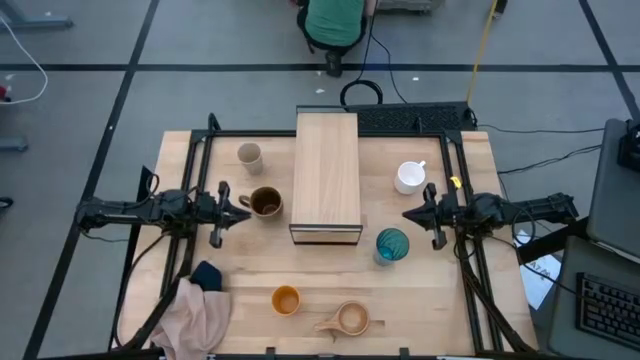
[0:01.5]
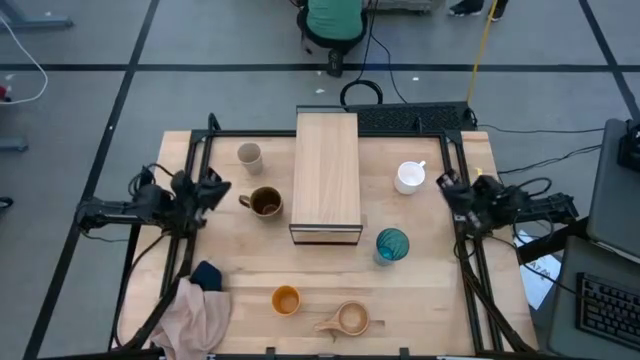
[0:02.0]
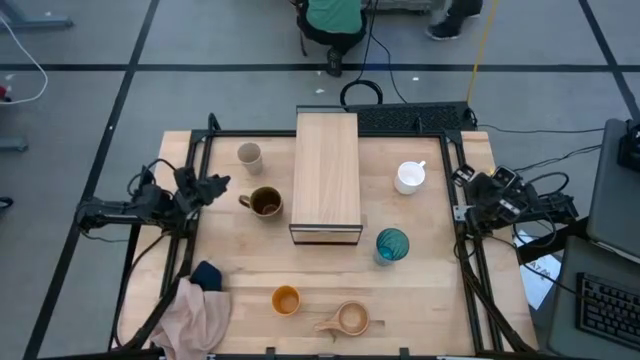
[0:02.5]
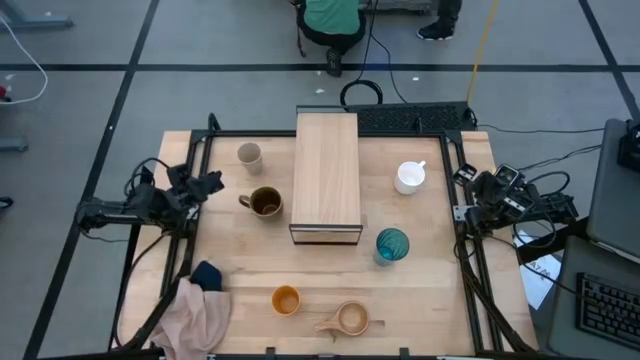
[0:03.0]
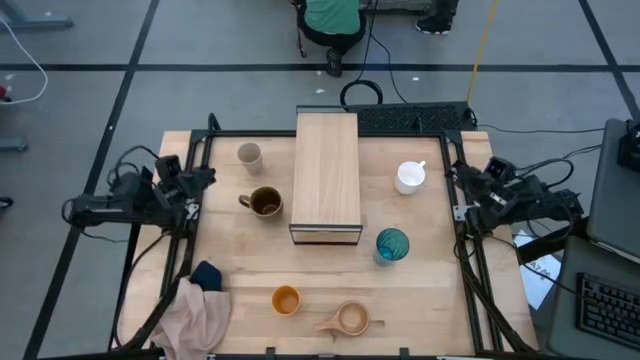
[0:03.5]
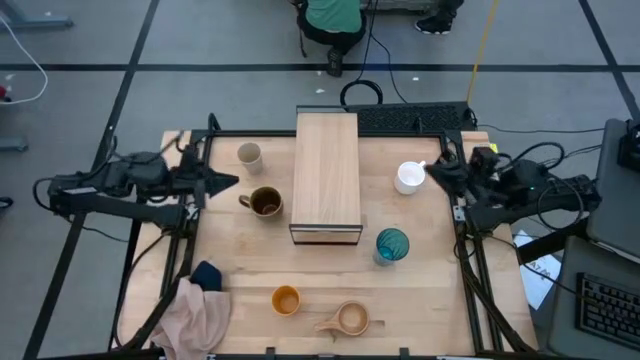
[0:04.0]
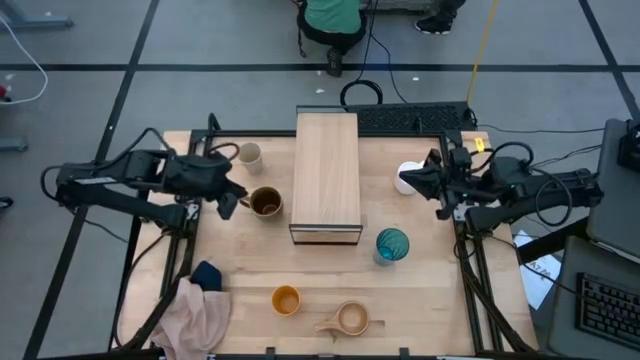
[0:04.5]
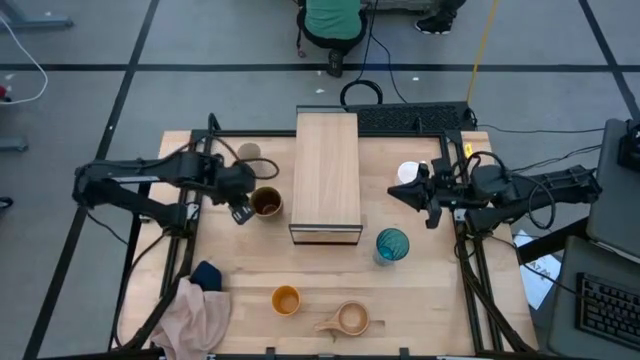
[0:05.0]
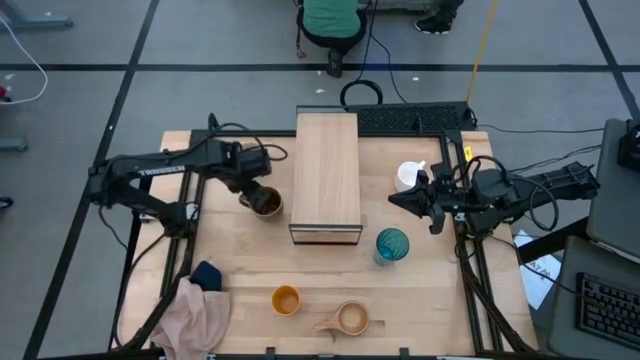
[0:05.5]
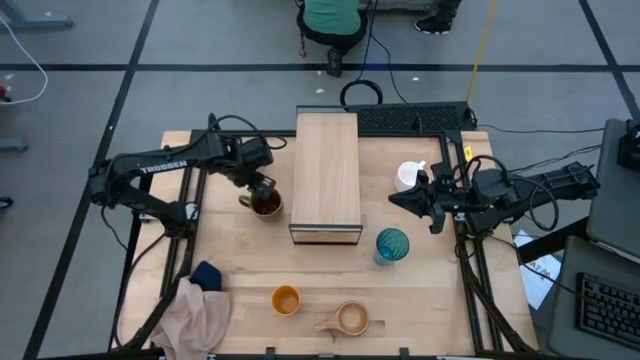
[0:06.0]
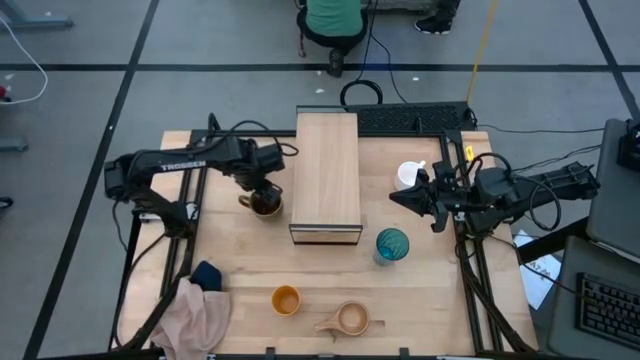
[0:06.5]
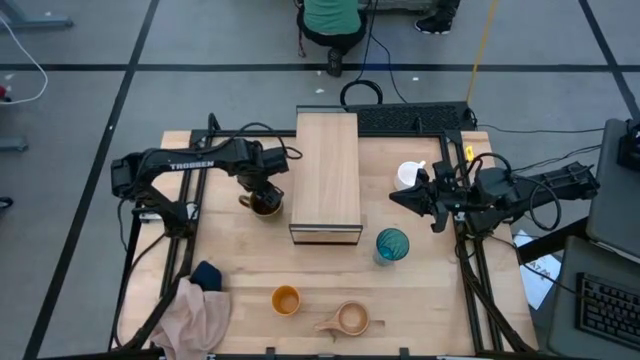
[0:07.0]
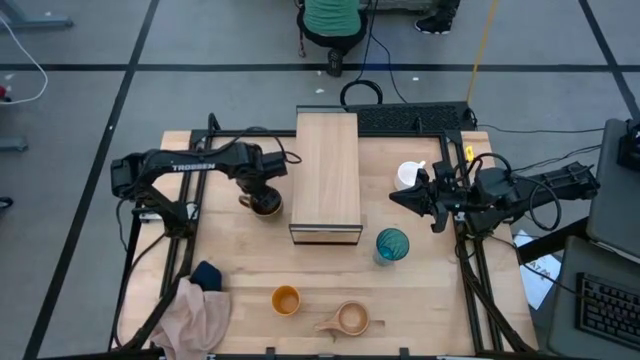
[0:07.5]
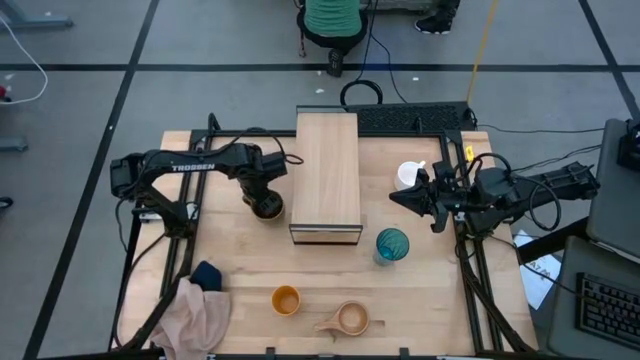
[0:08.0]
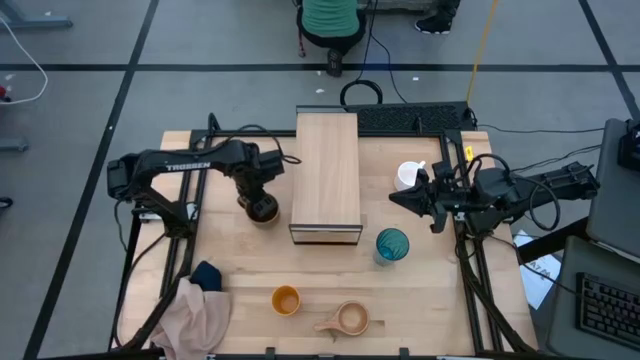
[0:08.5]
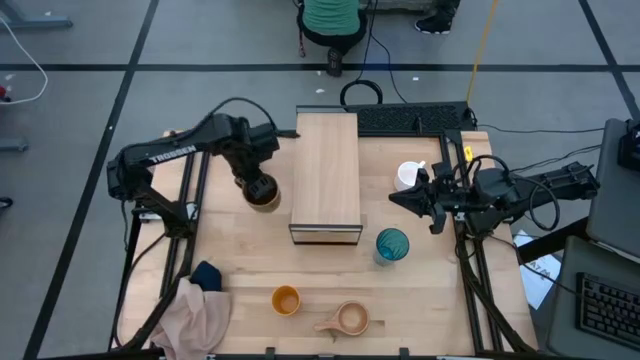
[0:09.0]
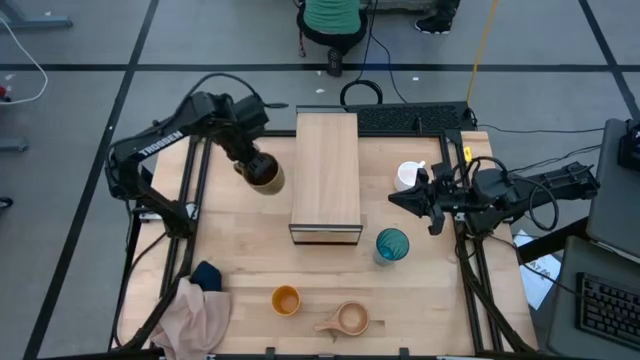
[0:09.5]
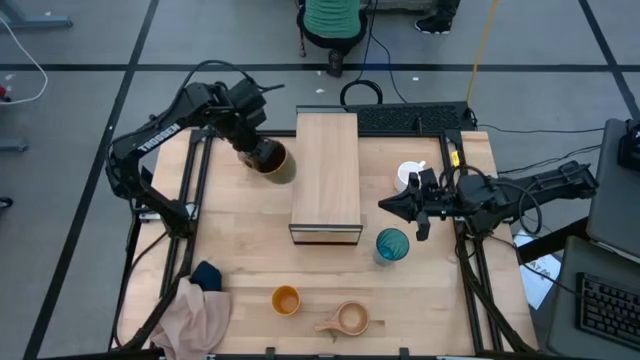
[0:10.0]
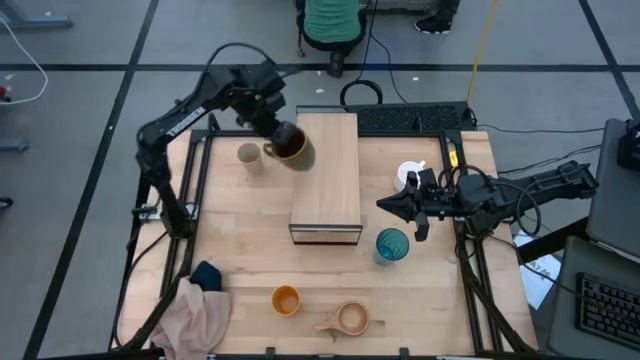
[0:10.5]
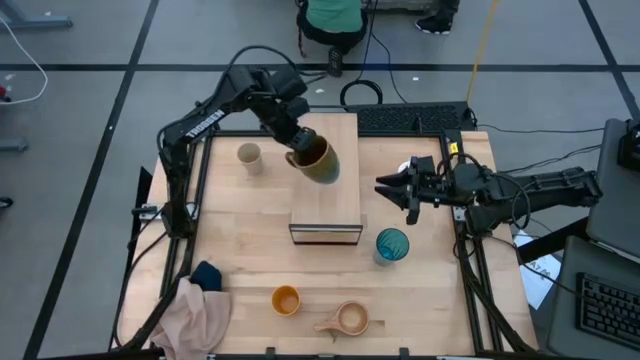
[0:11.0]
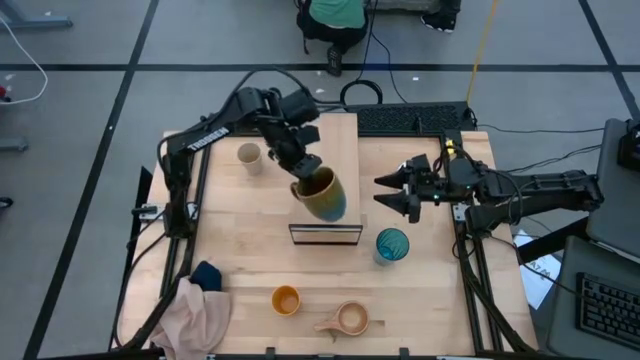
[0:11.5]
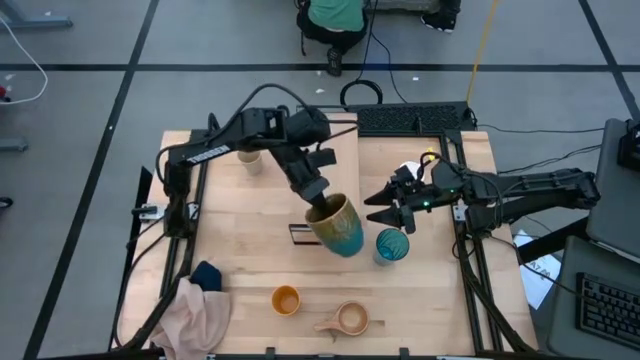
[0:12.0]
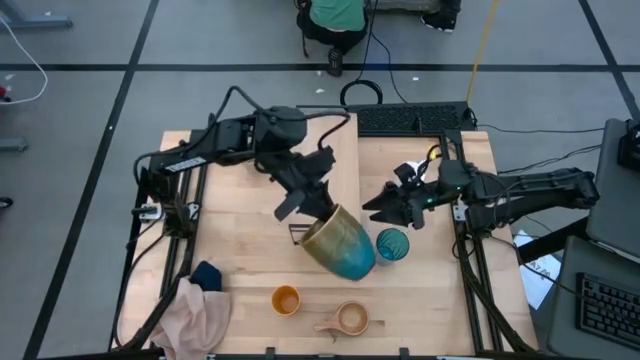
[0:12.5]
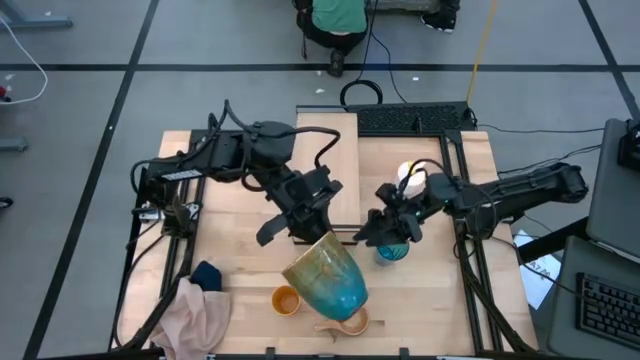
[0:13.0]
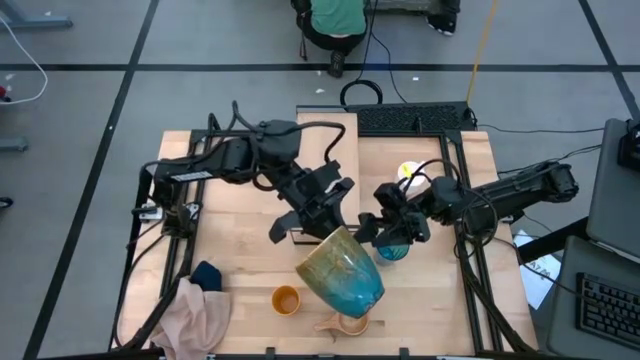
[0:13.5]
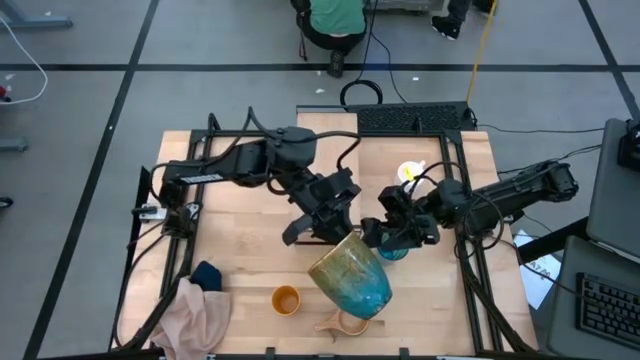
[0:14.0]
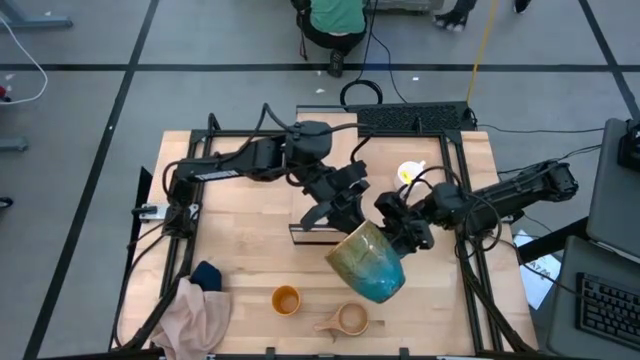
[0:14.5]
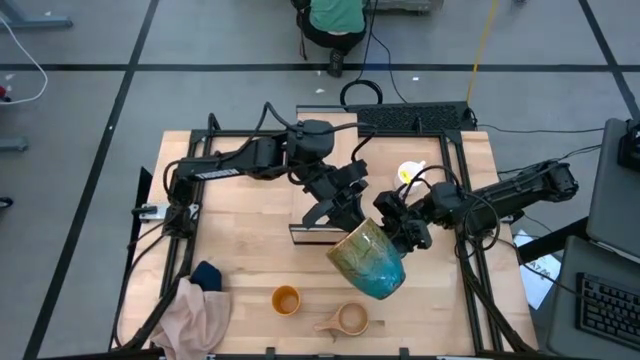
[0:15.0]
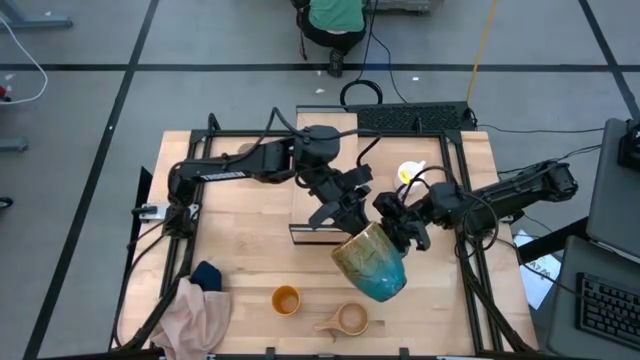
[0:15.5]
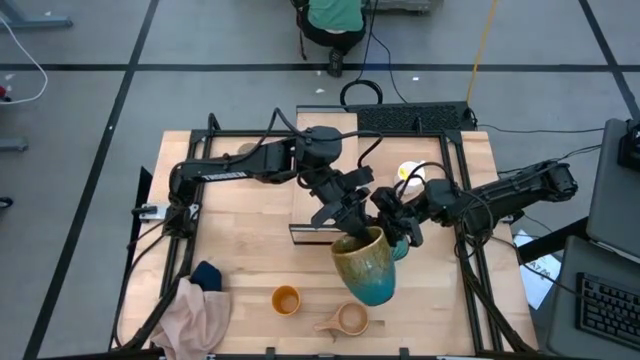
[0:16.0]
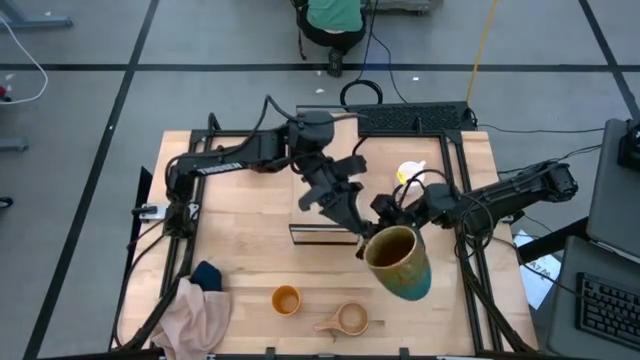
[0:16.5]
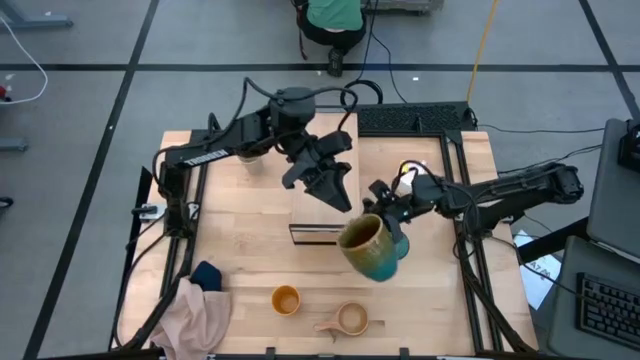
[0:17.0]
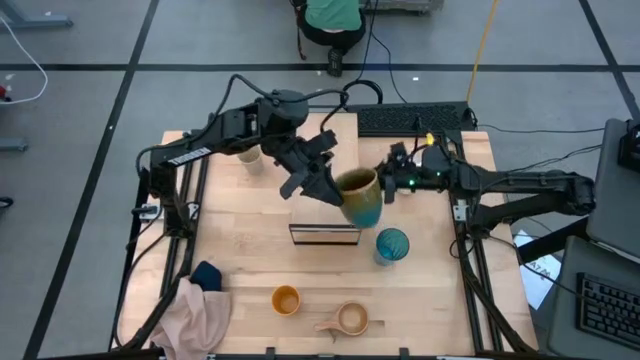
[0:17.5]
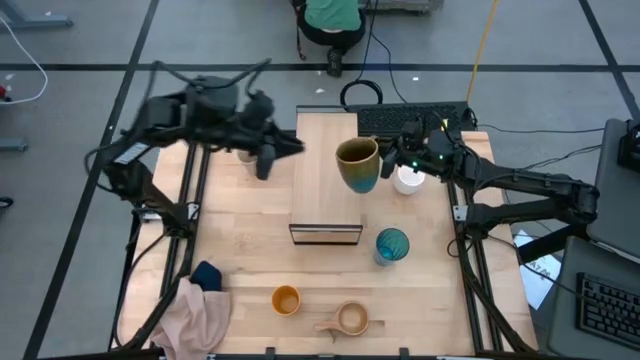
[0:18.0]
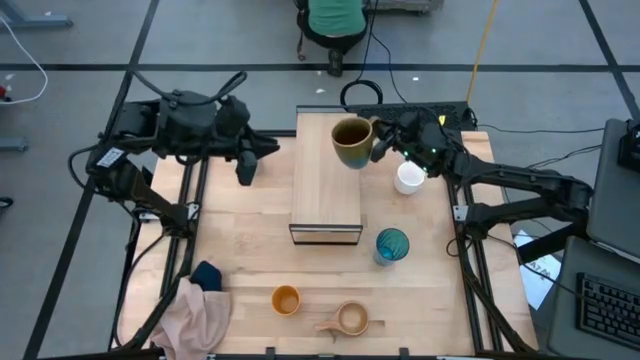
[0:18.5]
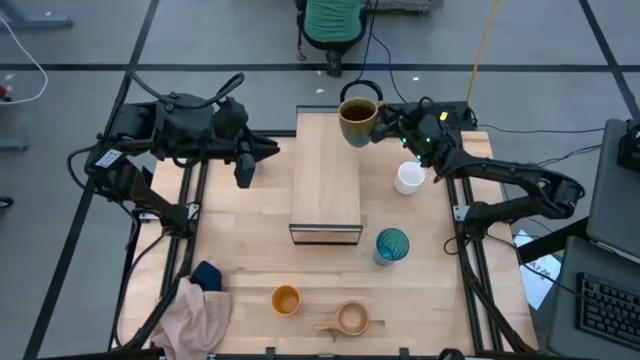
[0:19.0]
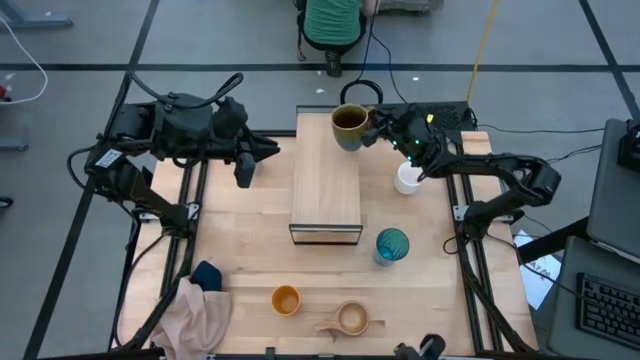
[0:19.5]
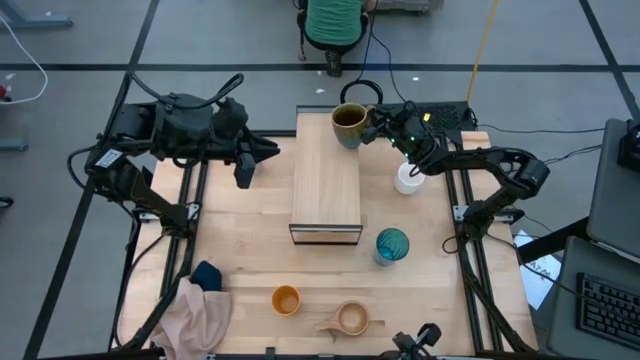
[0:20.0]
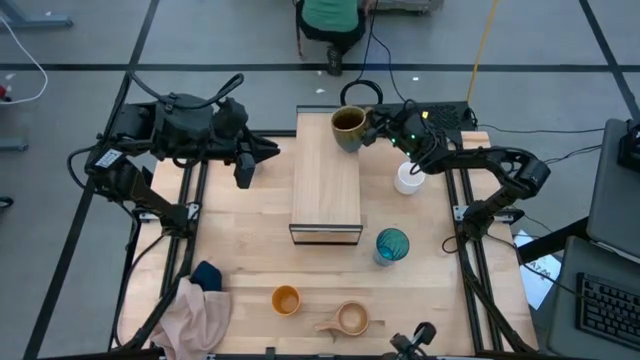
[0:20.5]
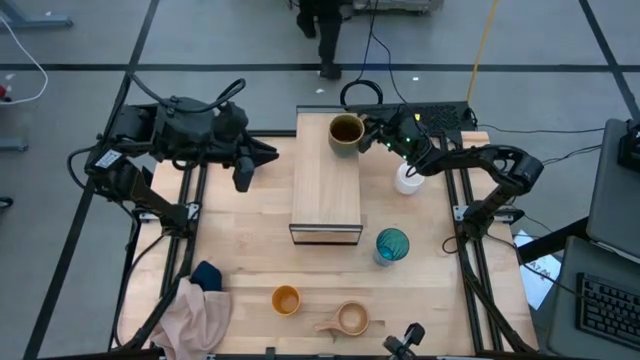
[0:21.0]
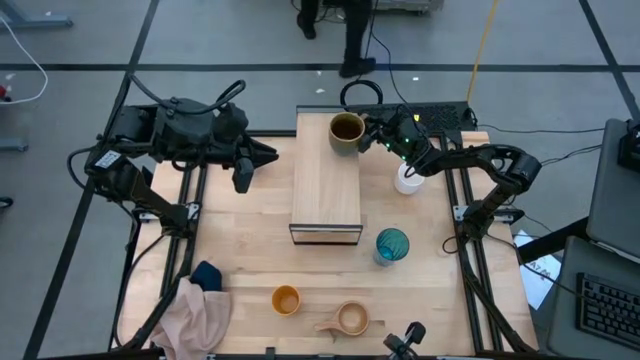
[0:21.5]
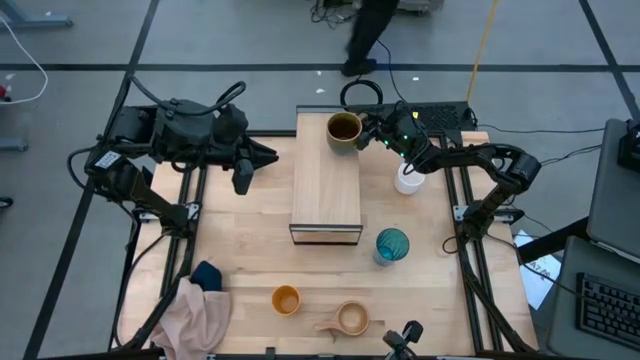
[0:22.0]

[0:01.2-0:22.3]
Task: Stack small to large cups/mugs on shelf
Put the brown mug on the shelf
